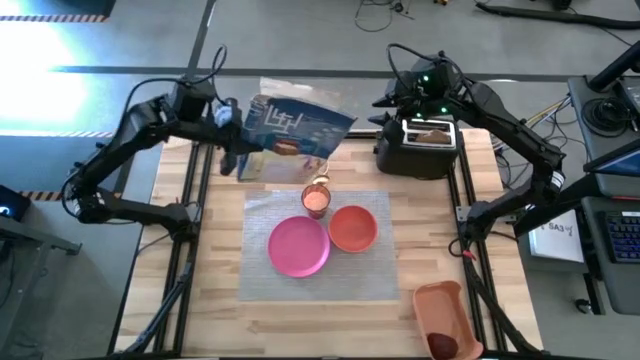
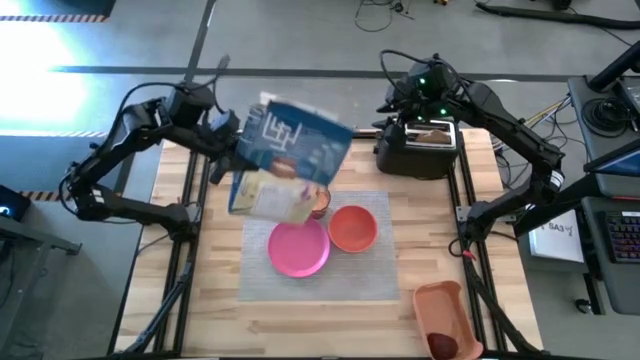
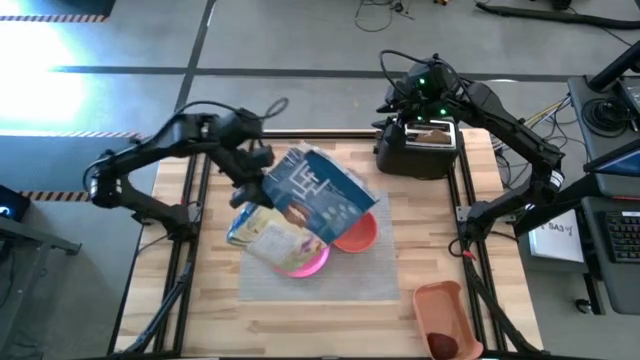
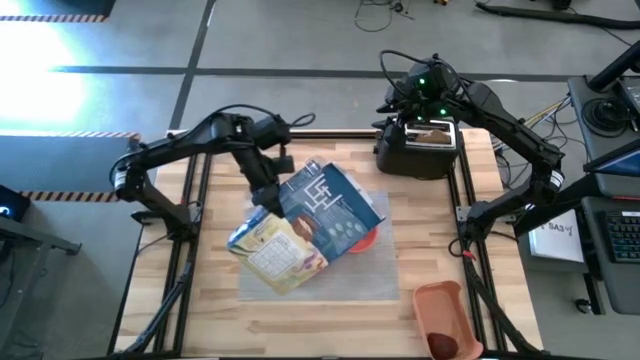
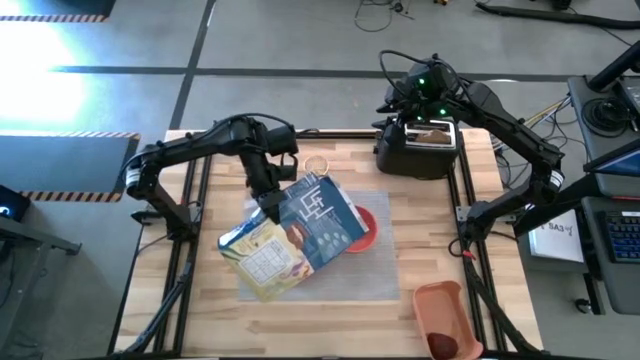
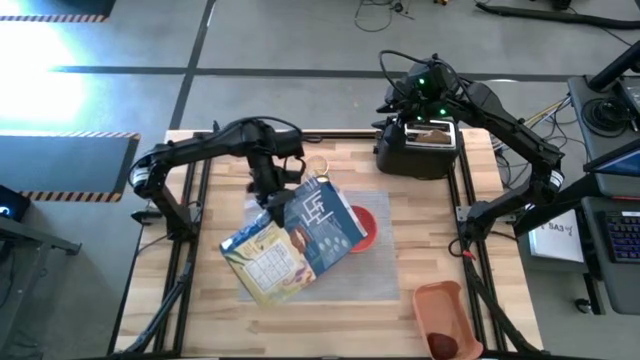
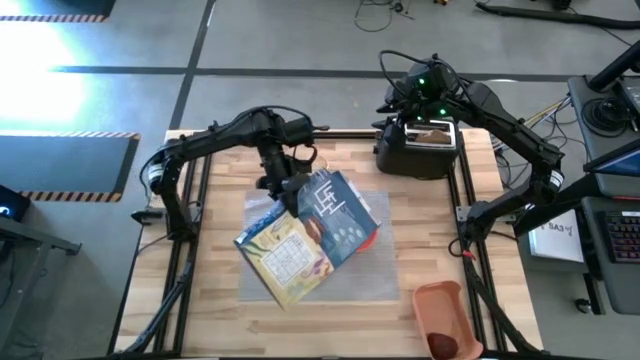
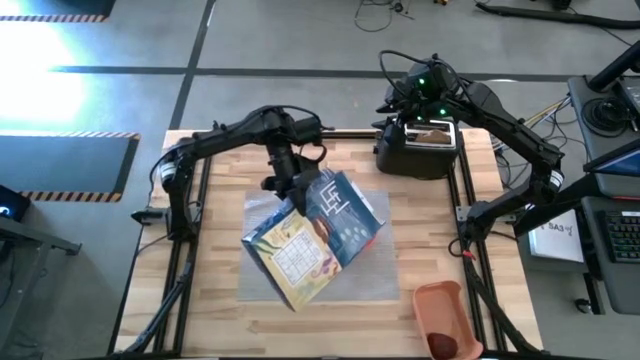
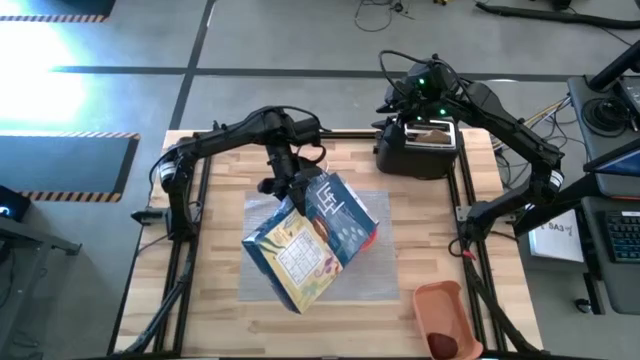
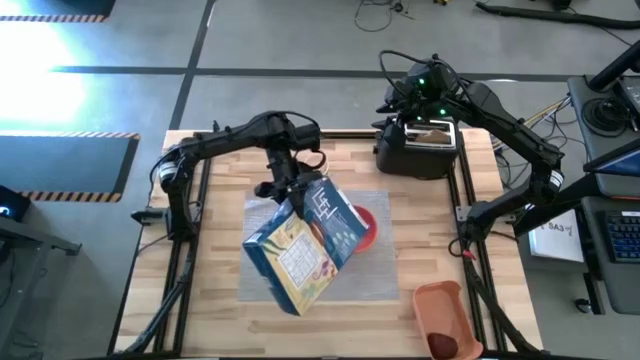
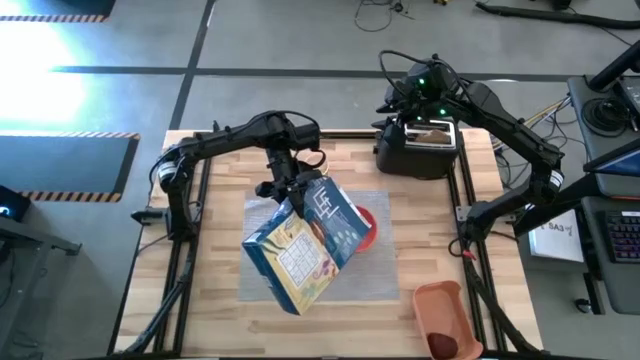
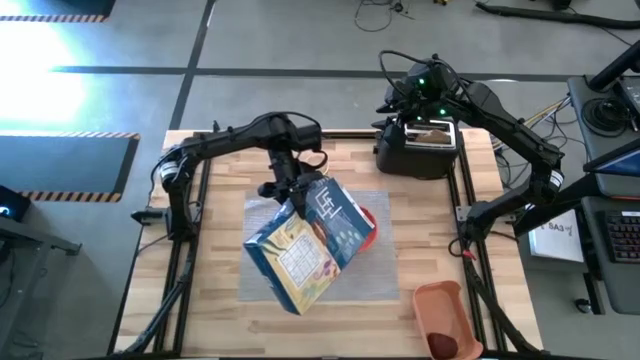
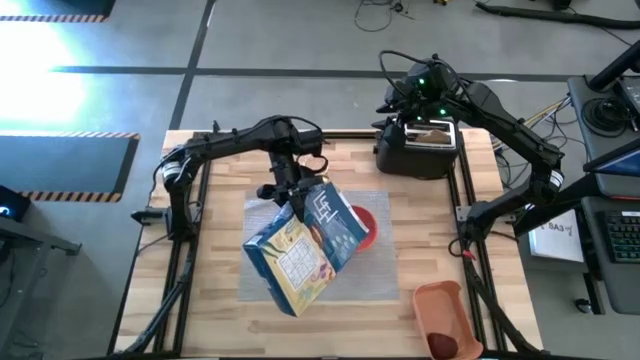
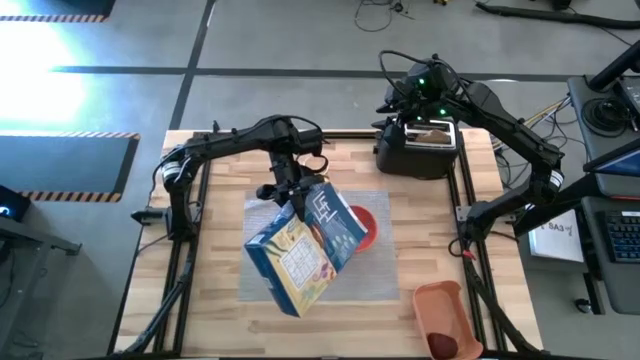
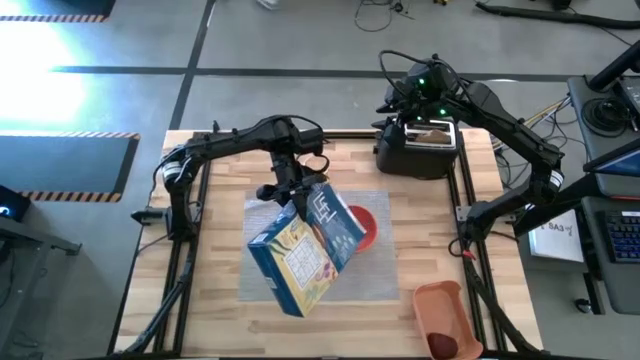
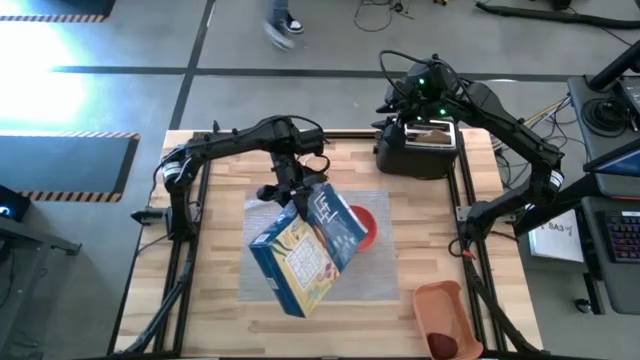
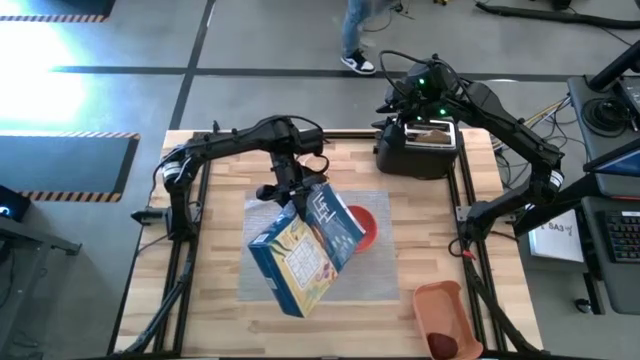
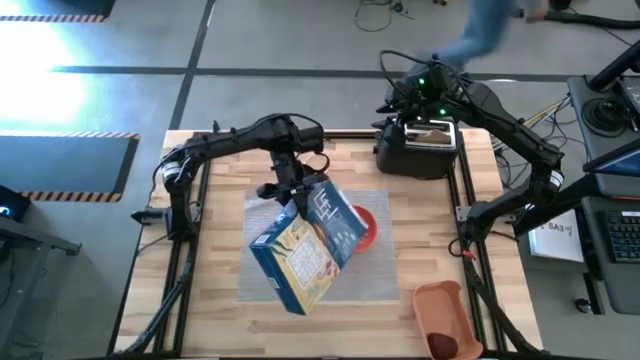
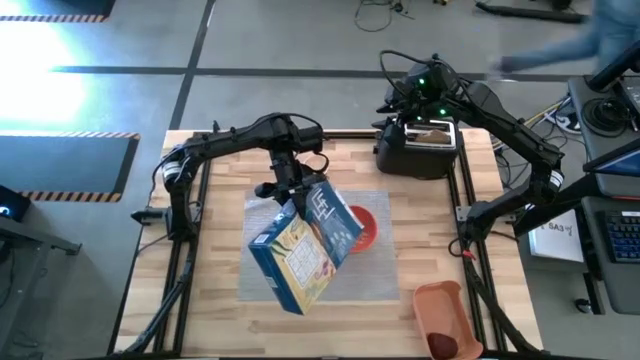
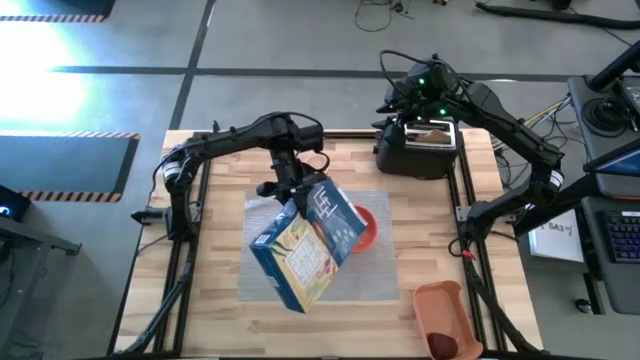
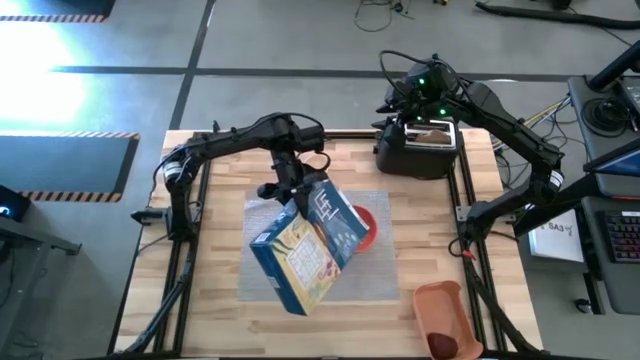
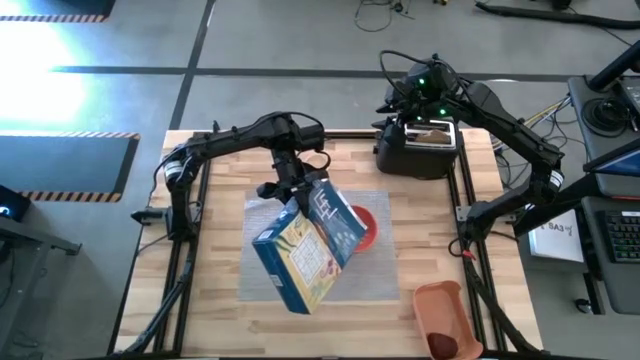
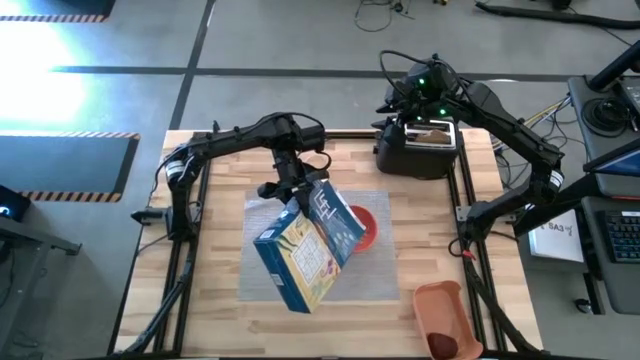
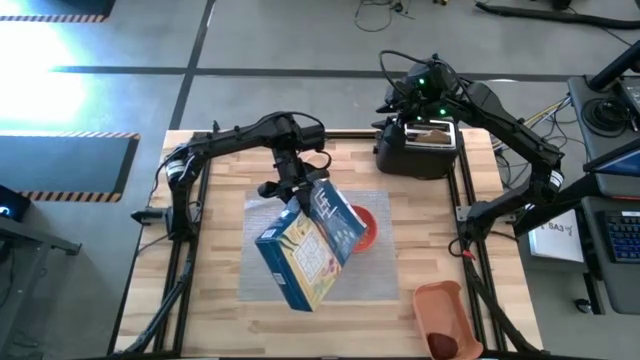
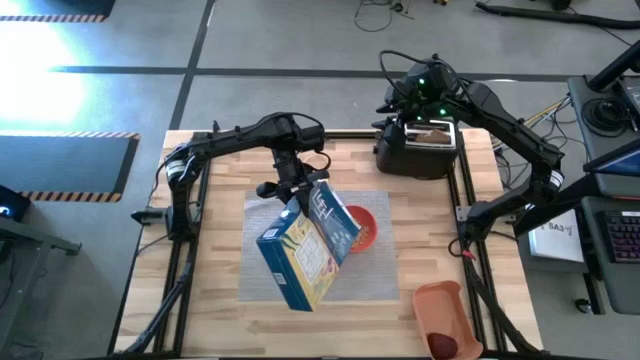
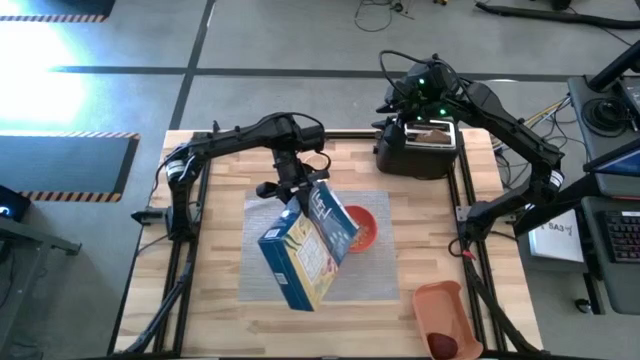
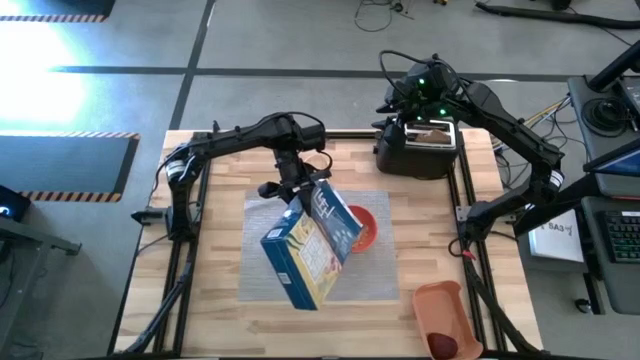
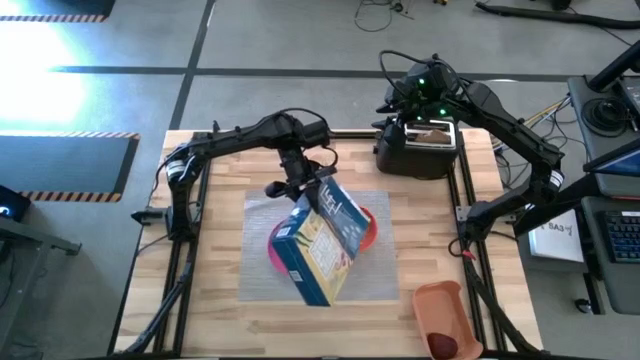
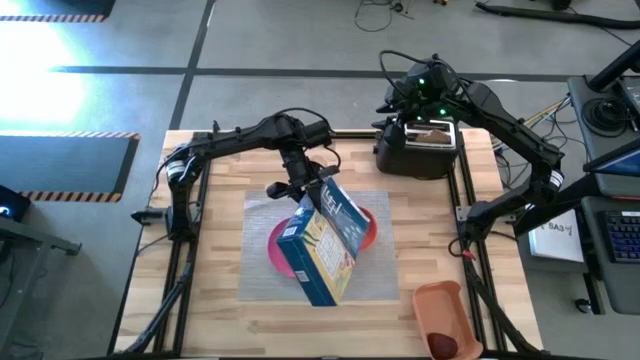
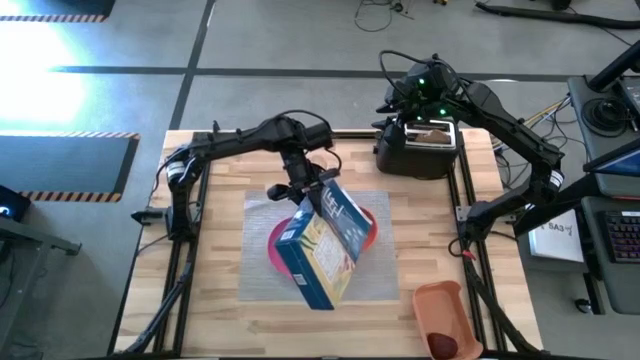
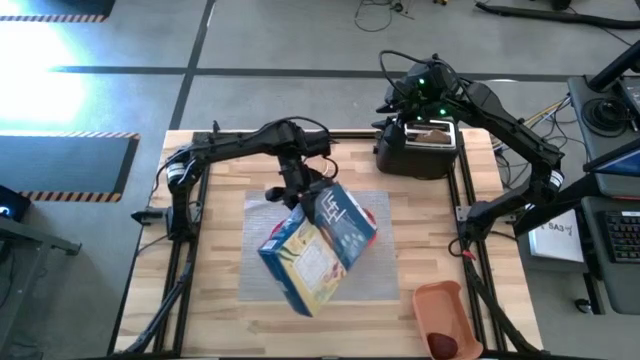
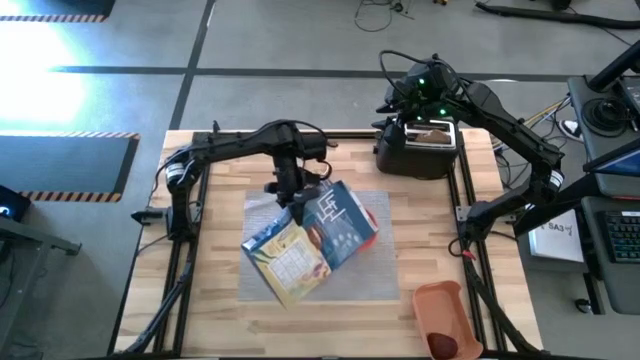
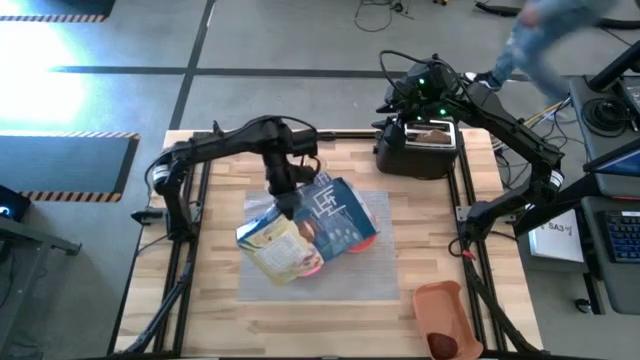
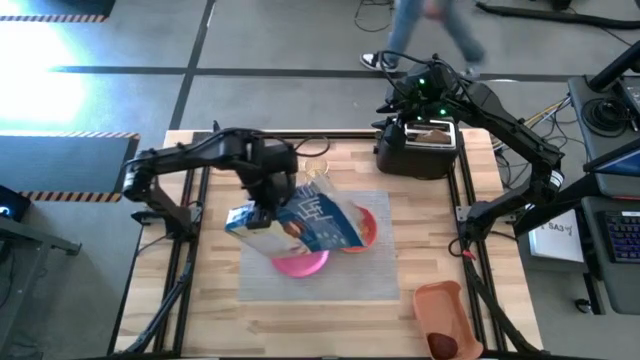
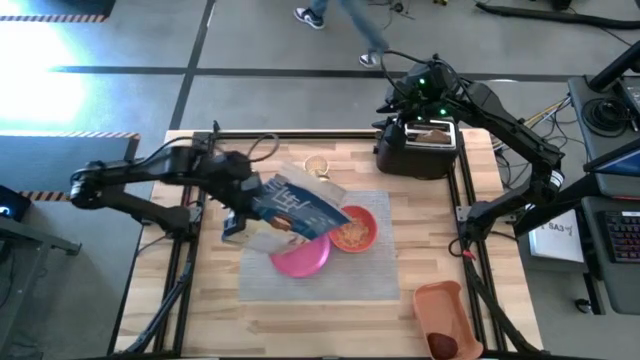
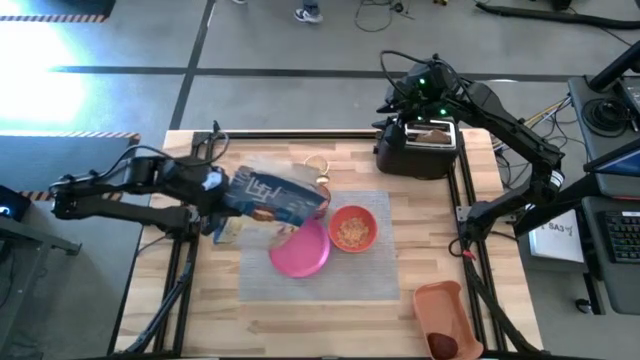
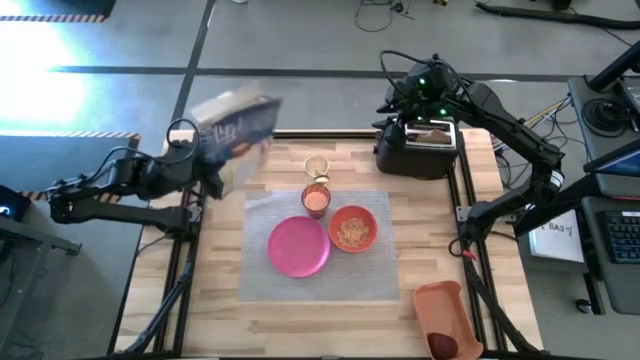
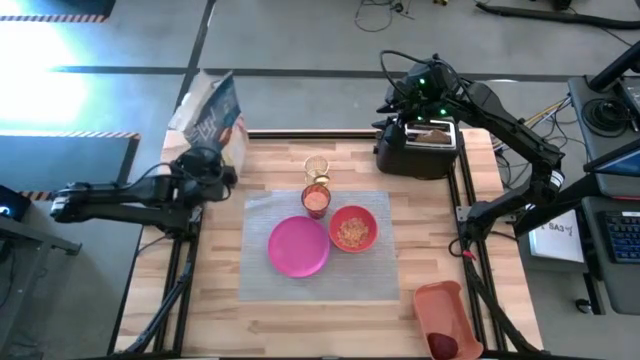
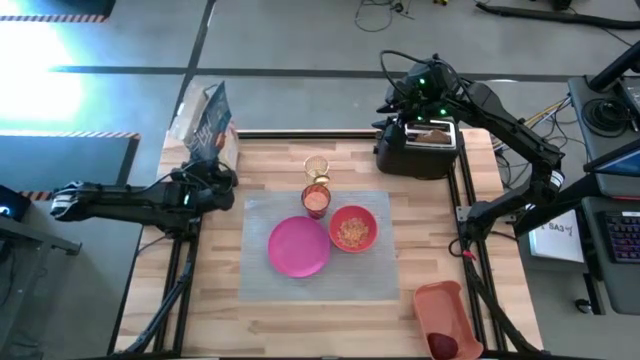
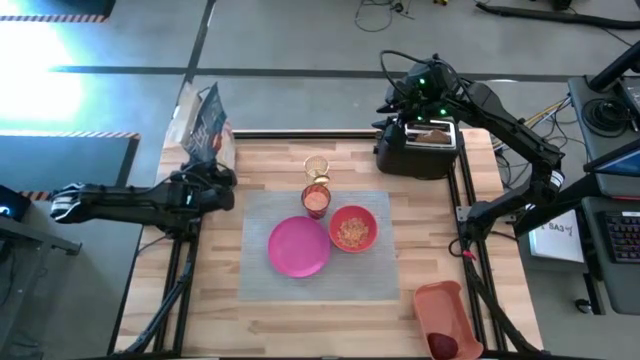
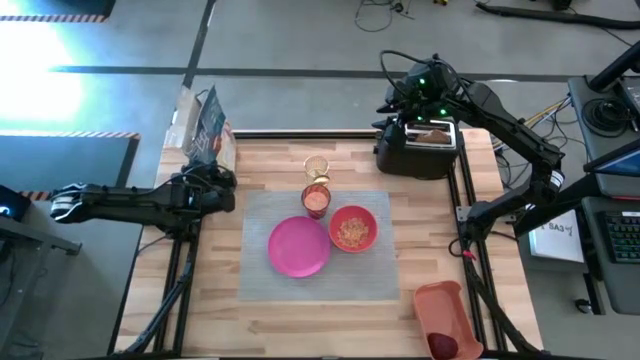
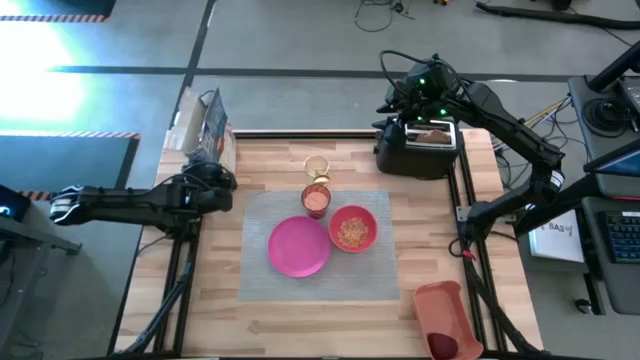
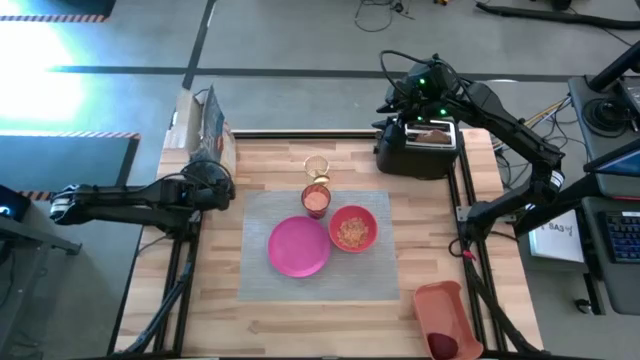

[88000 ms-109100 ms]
Task: Arrange a breakfast setting
Pour the cereals from the cereal box into the orange bowl on the table mat
